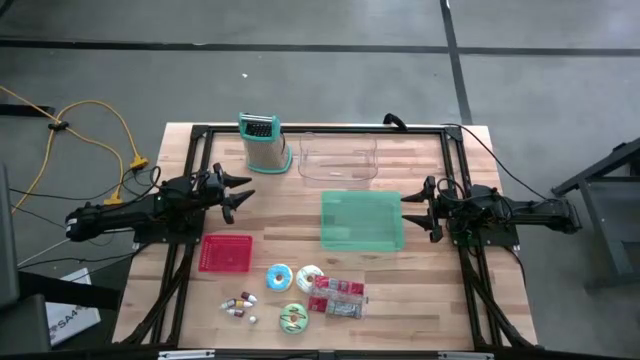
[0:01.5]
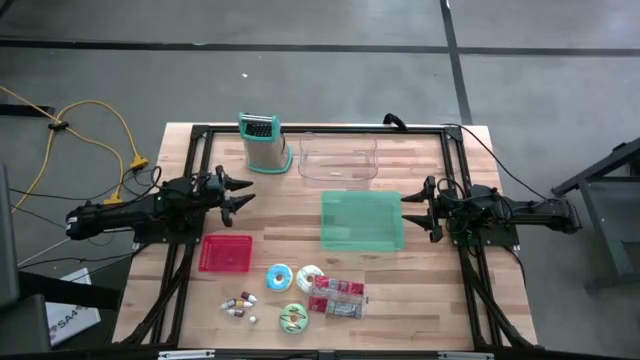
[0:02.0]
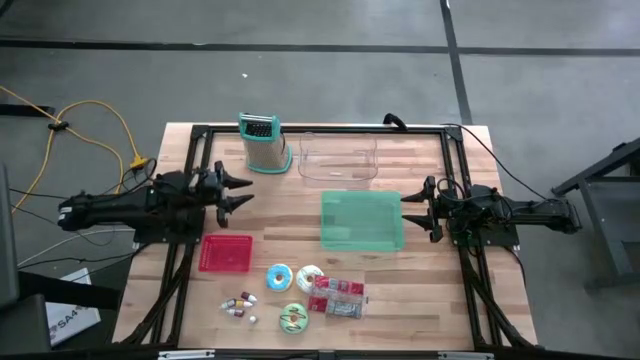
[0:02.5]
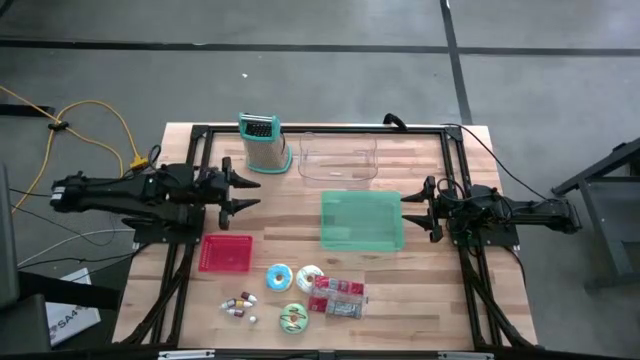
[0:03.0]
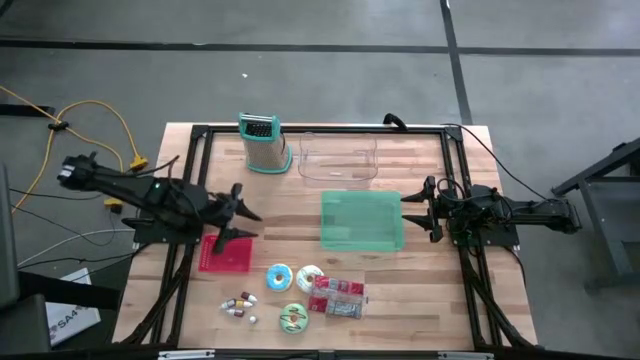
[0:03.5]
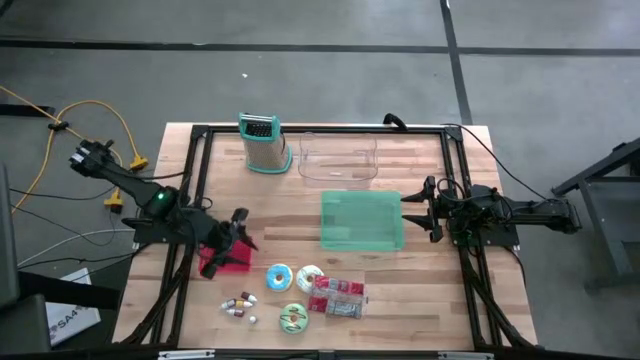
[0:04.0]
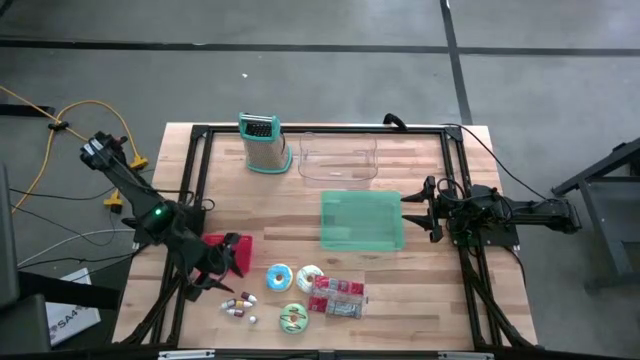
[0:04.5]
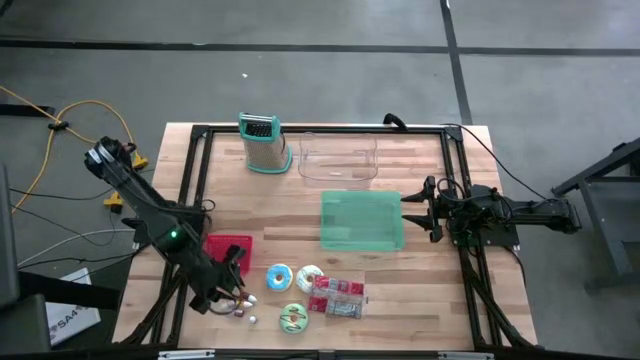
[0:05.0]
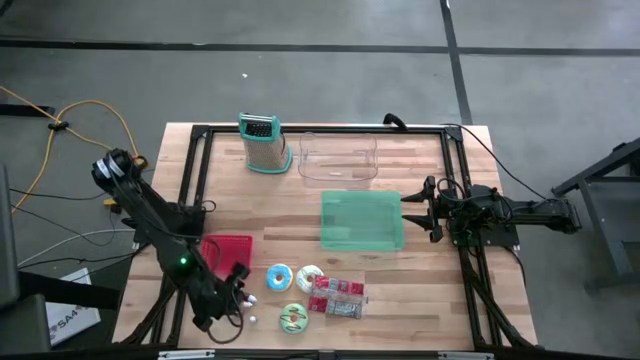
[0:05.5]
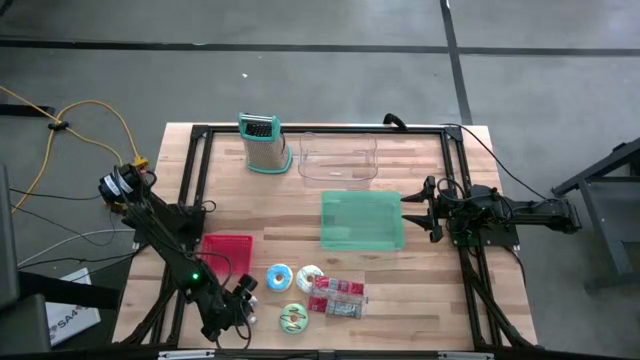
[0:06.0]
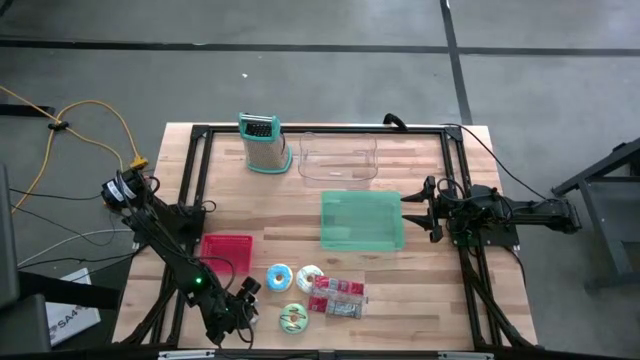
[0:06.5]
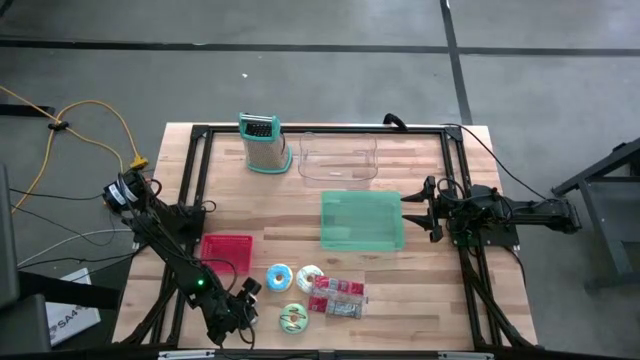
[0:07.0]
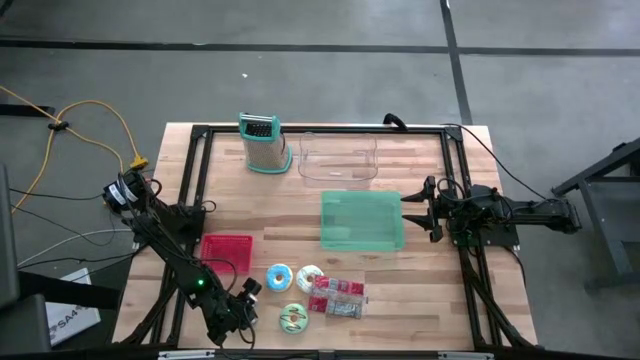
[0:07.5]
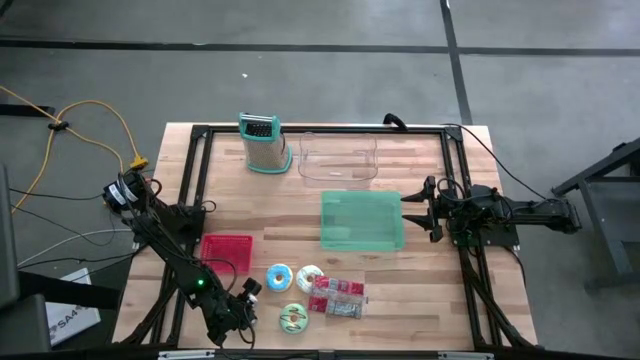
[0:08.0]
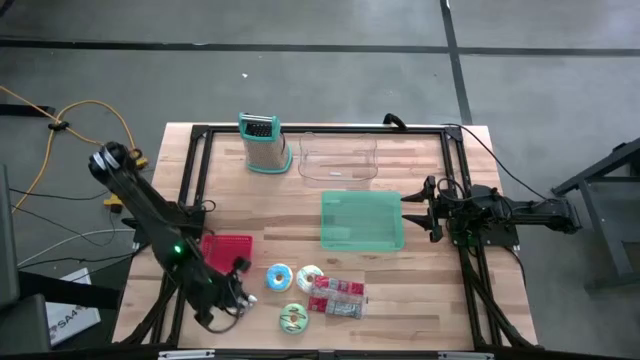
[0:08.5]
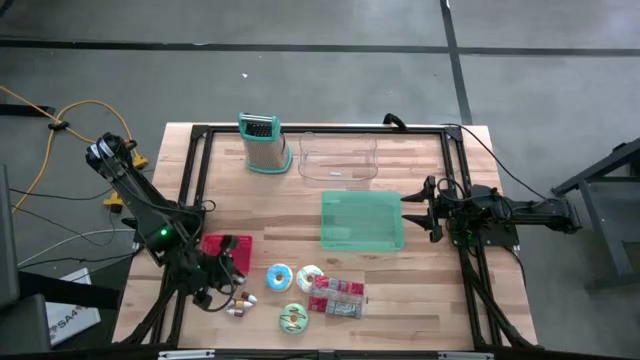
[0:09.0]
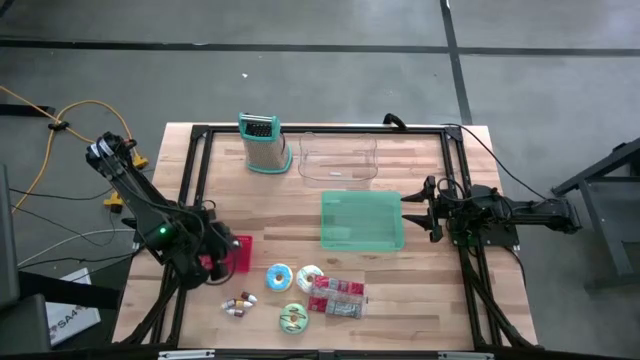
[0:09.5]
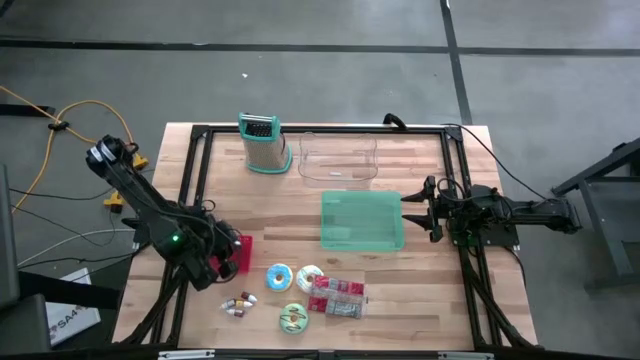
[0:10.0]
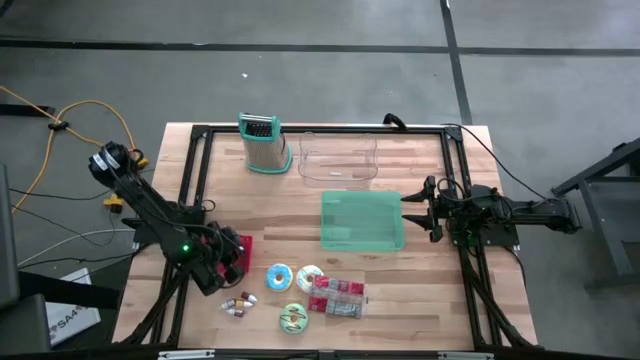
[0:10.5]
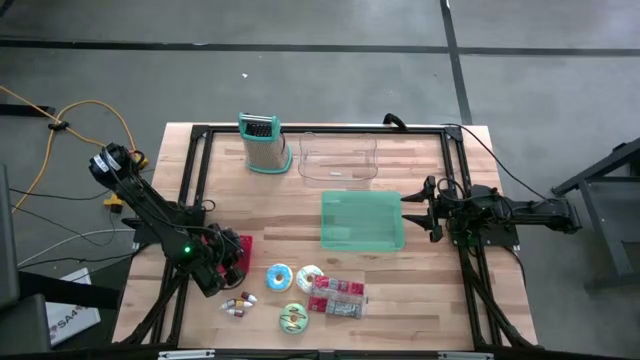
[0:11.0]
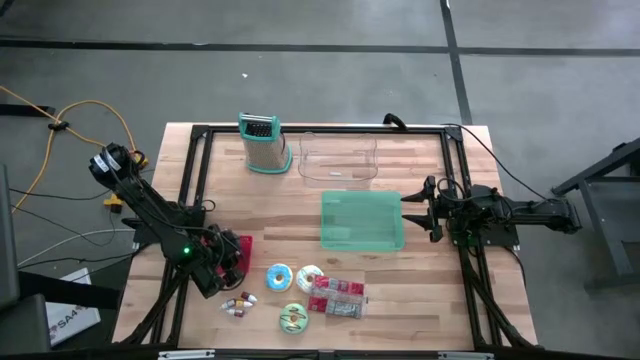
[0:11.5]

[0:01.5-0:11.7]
Put the right black food coloring bottle into the red bin

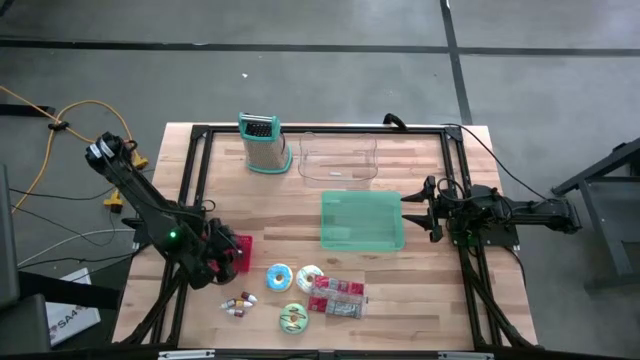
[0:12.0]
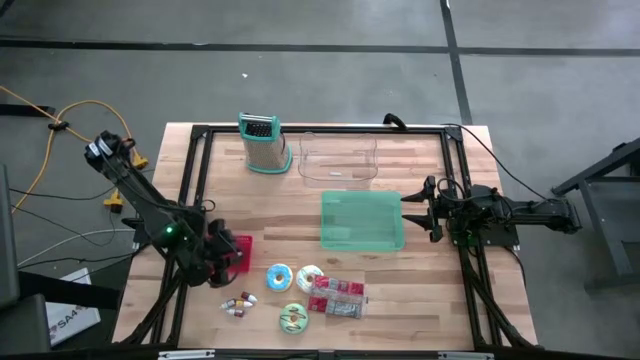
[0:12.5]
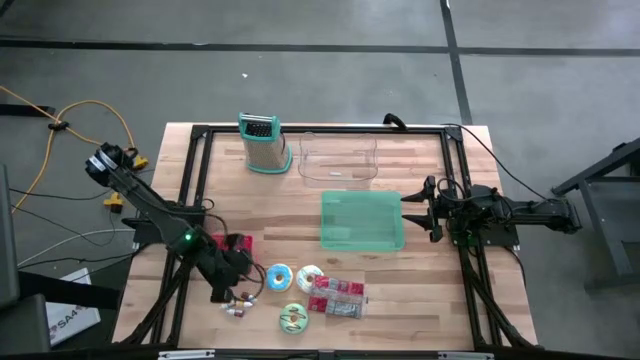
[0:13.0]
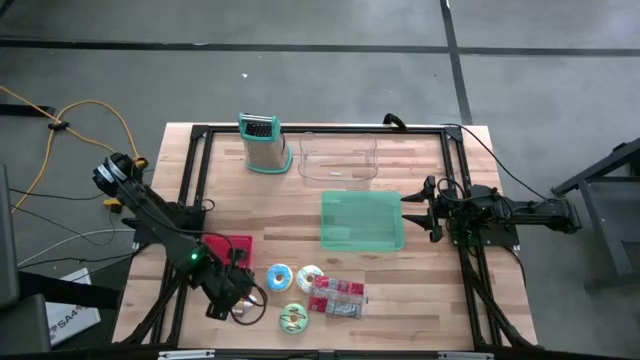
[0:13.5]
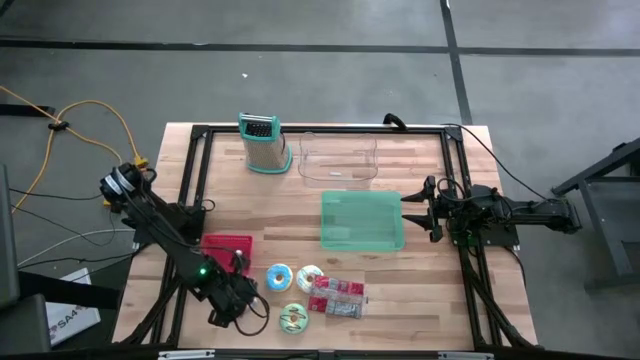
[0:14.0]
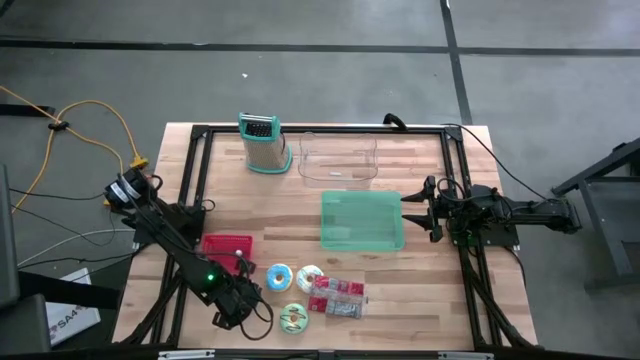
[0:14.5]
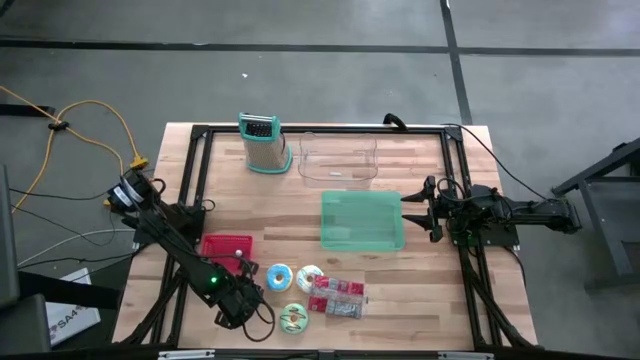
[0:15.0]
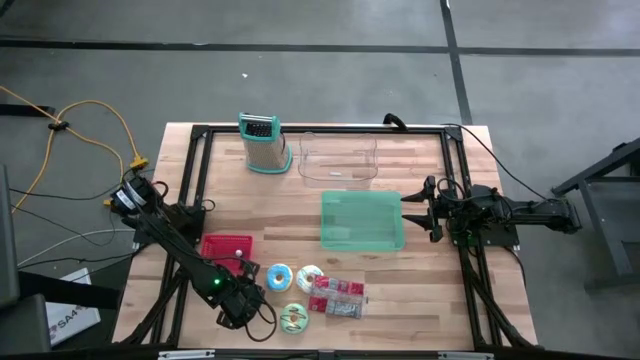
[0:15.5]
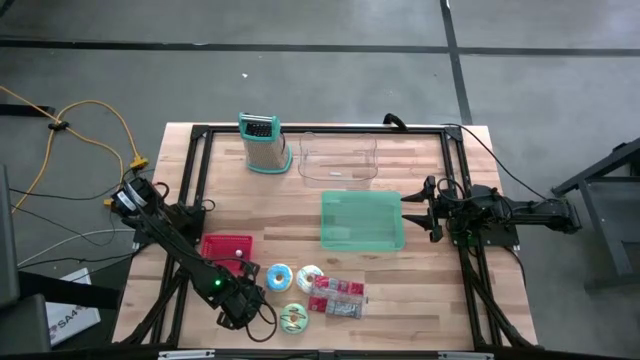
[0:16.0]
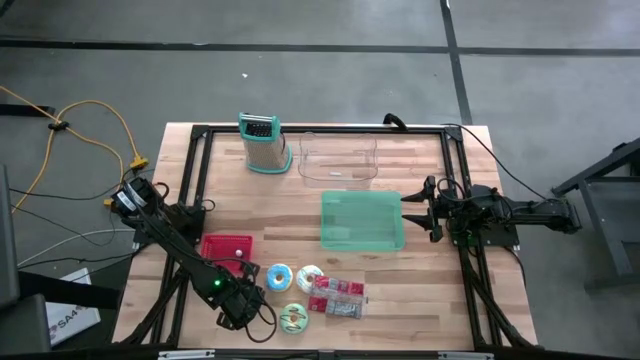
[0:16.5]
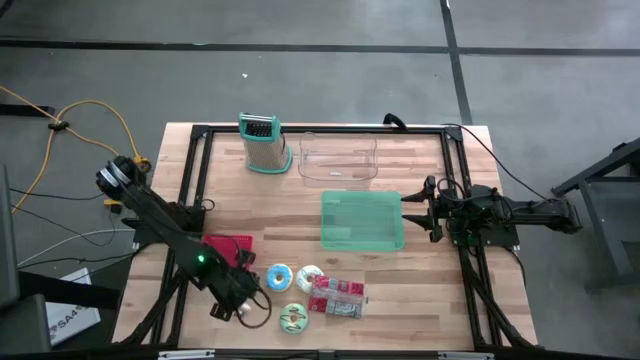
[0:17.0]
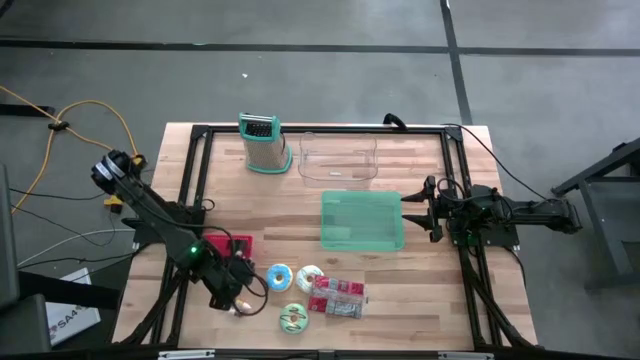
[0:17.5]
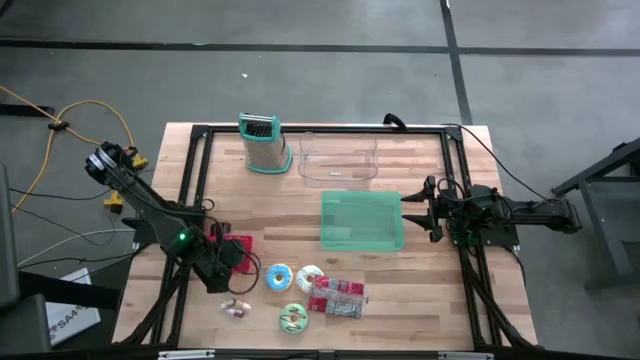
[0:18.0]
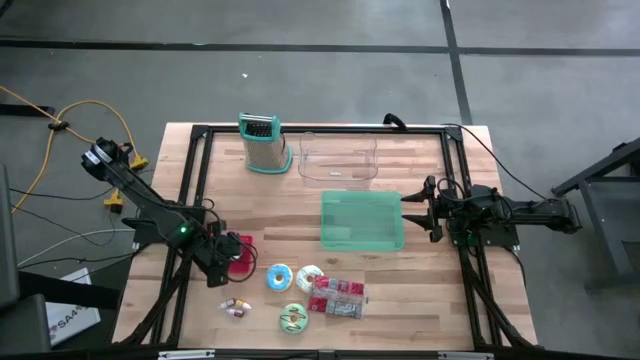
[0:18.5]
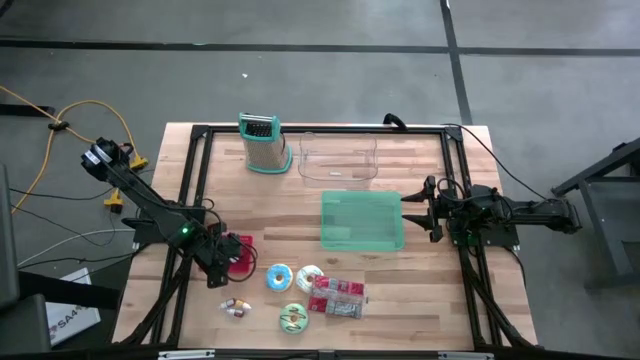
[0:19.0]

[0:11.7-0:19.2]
Put the top red food coloring bottle into the red bin
